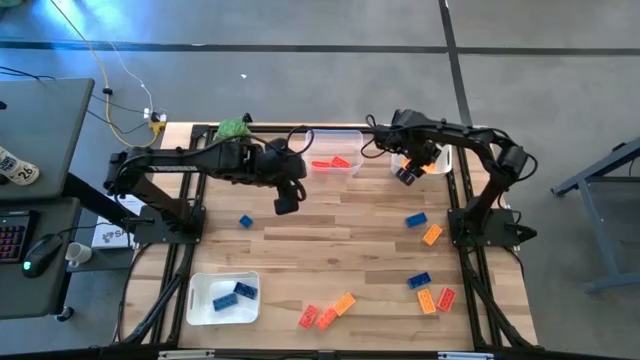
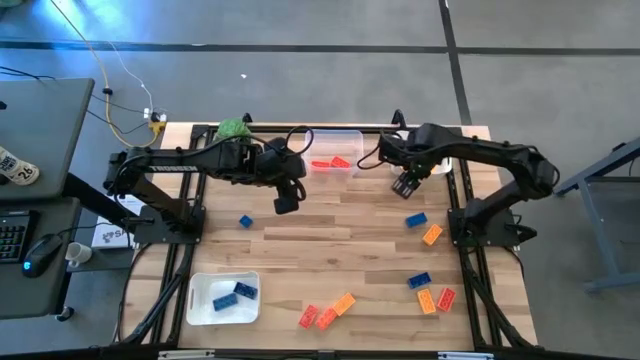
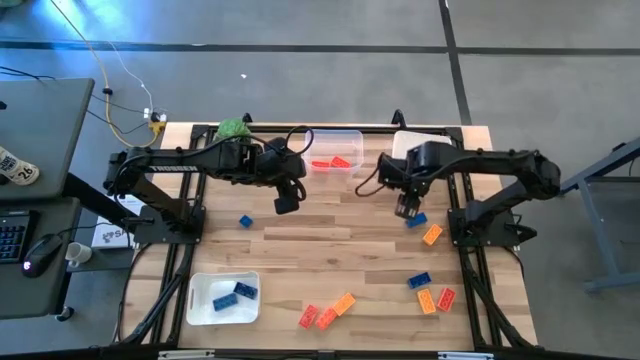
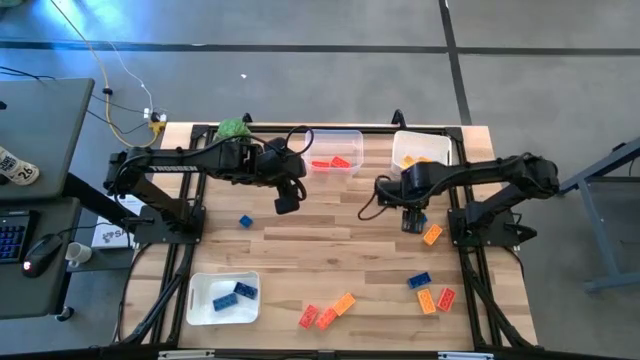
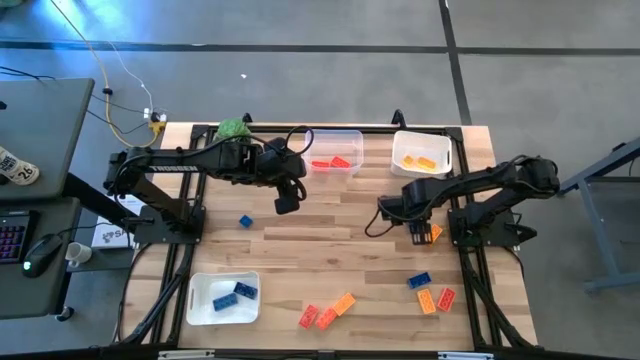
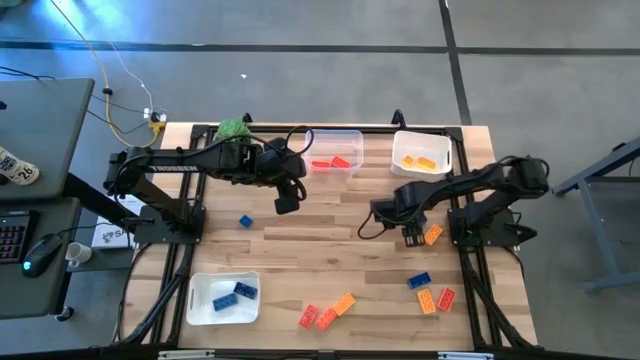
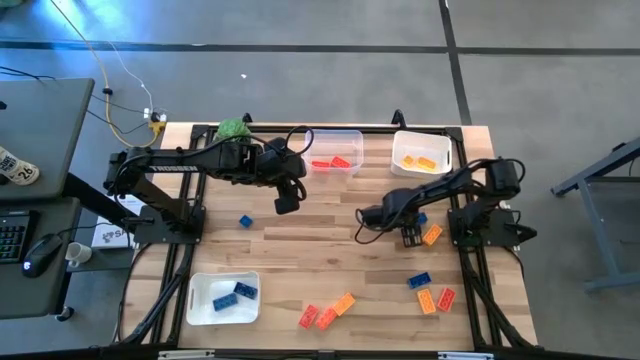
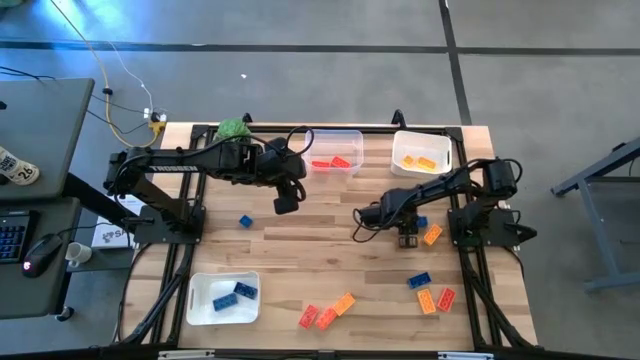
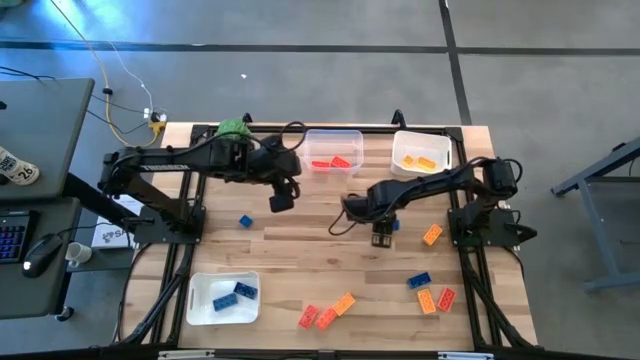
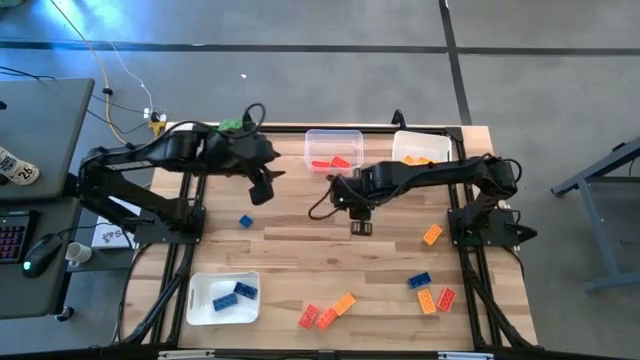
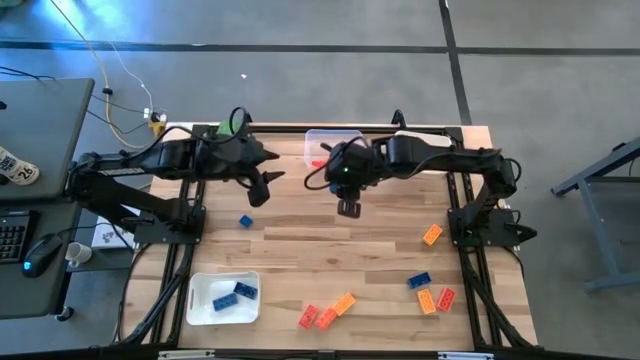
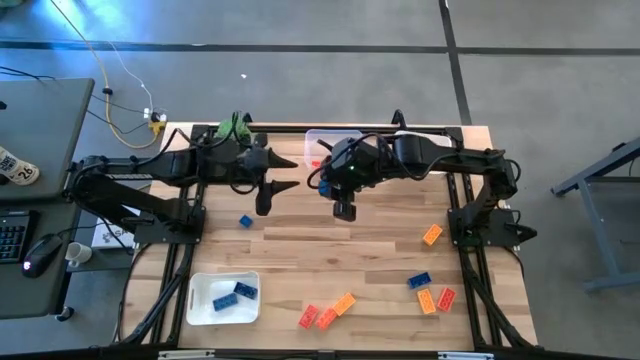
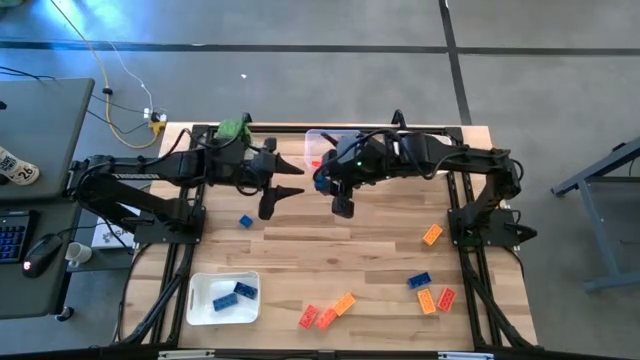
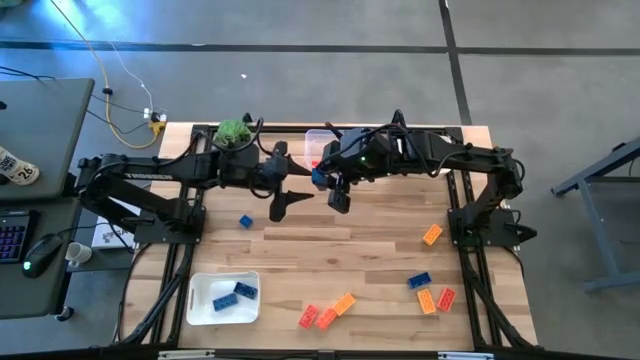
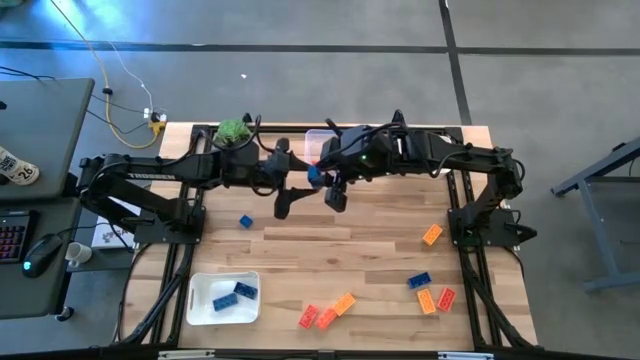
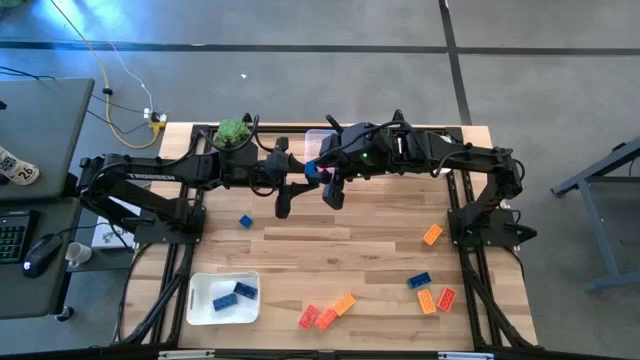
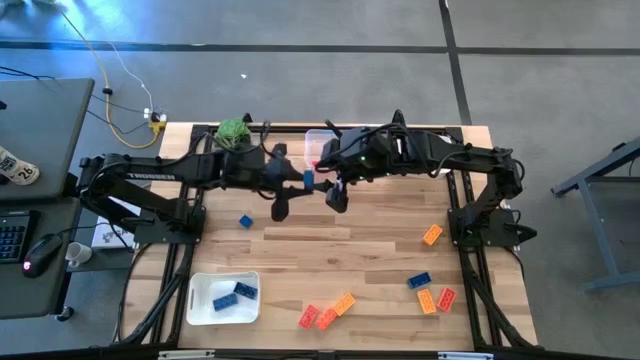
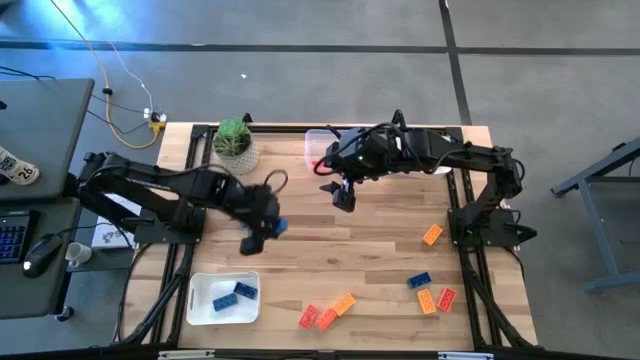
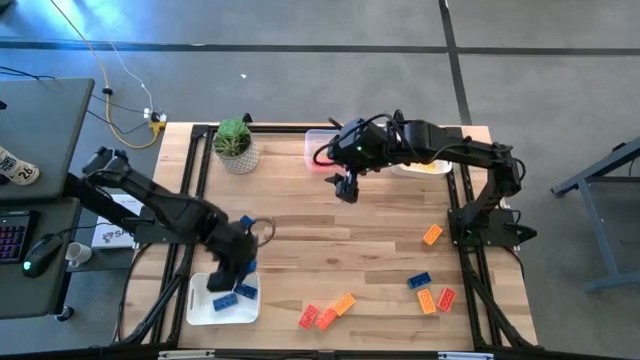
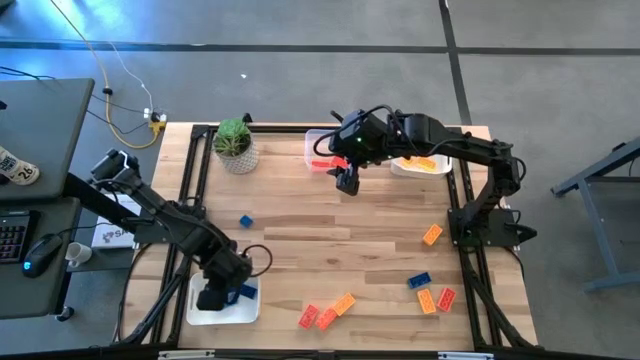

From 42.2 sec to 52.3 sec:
Task: Sort & place blocks by color
Put the blue game piece into the bottom white bin

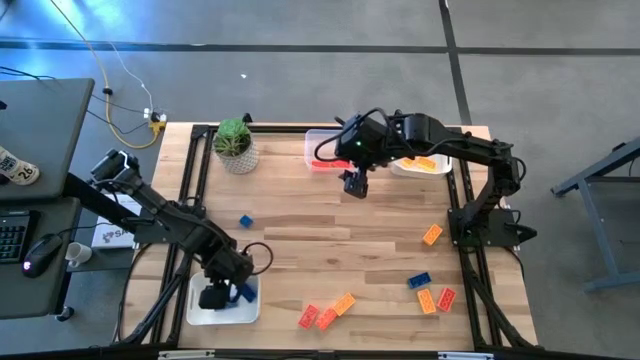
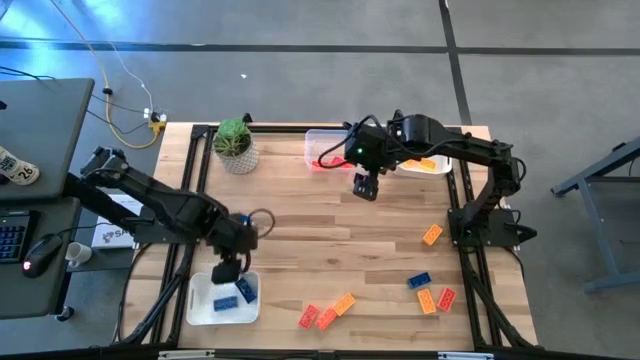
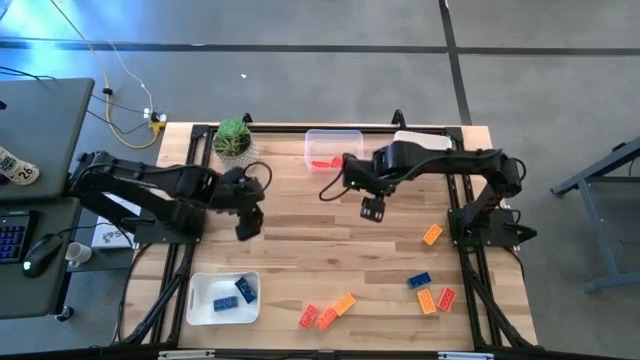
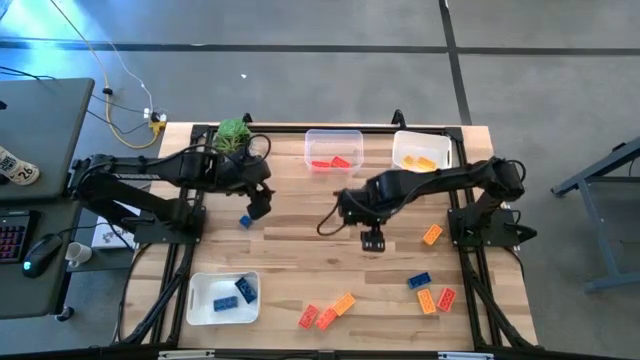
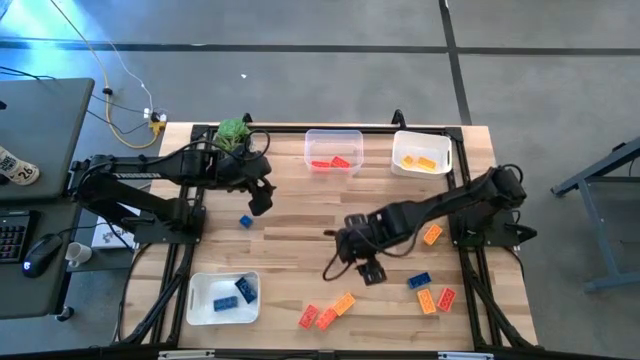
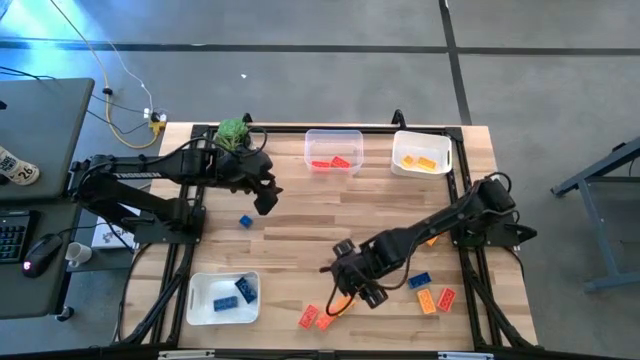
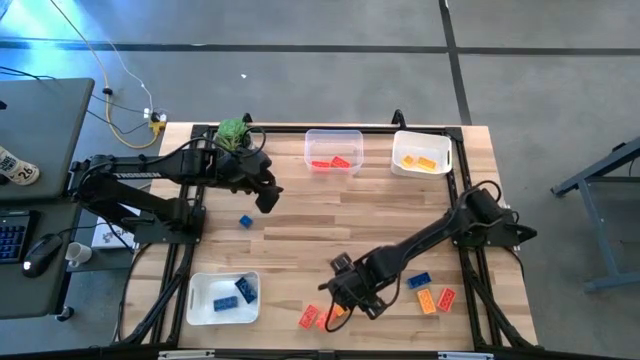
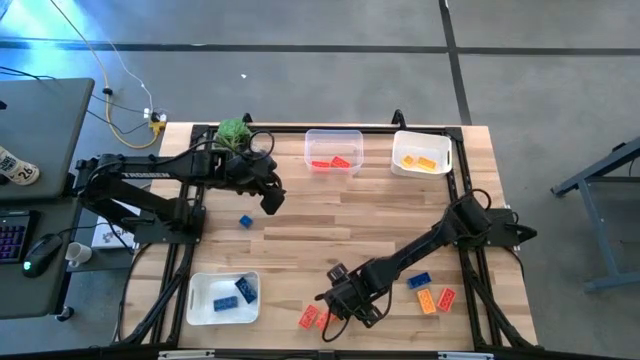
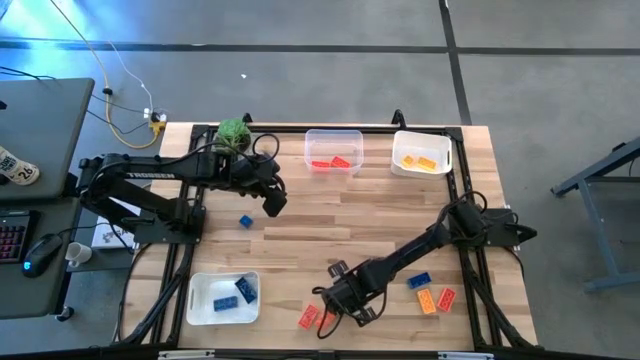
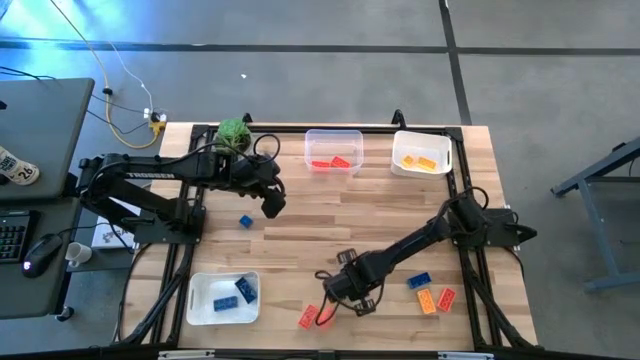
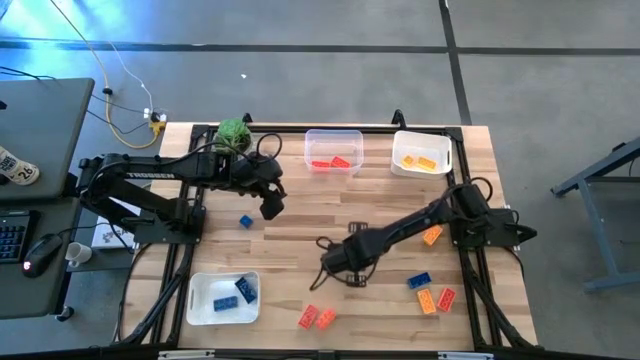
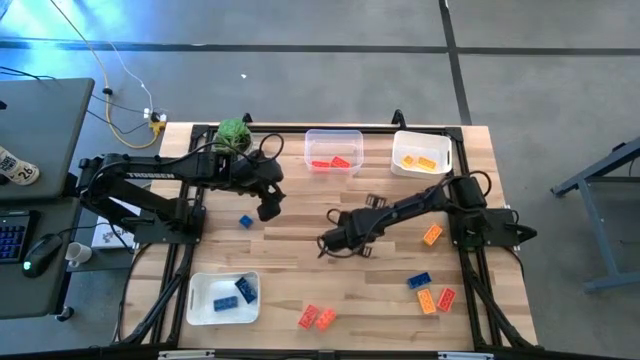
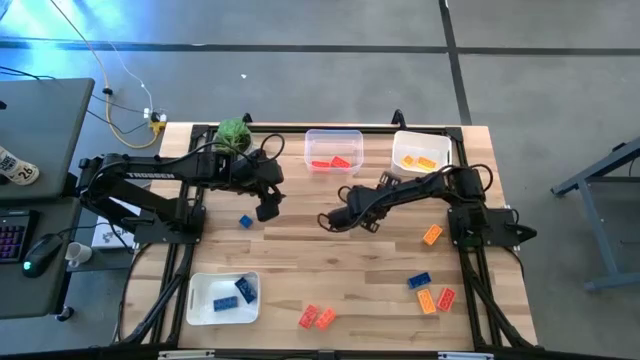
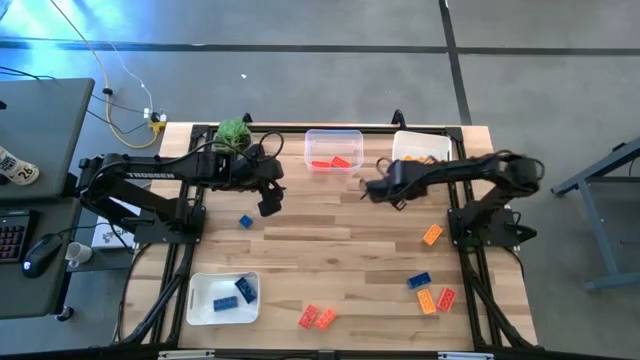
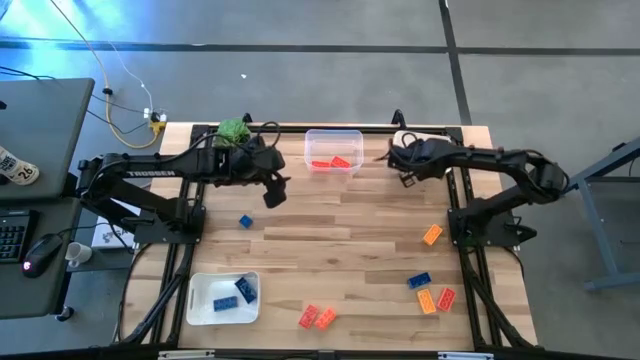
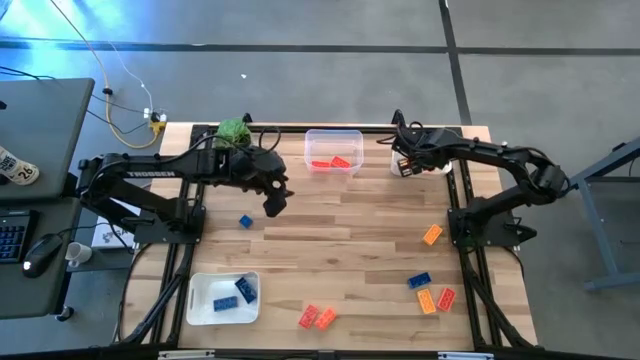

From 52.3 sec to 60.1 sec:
Put the yellow game piece into the top white bin

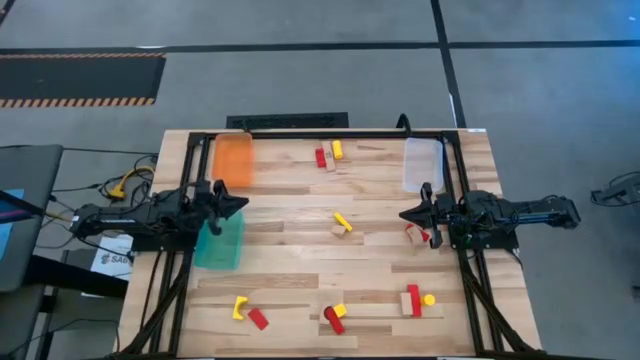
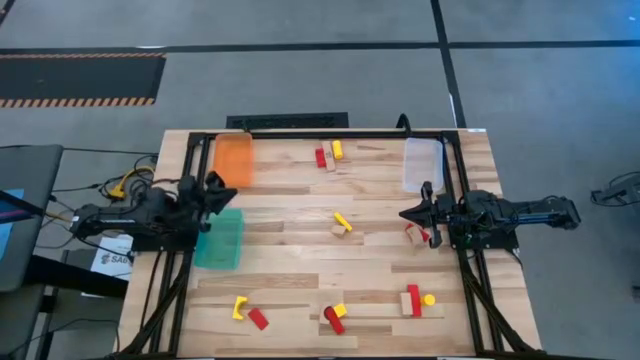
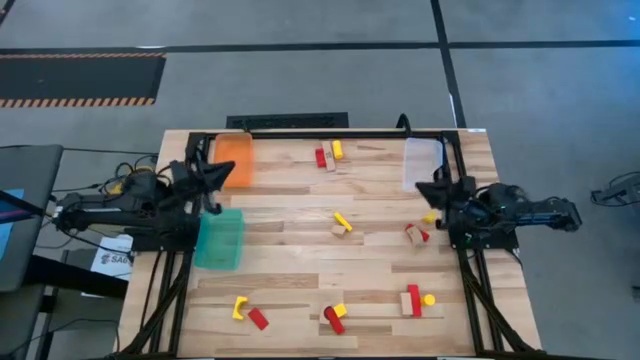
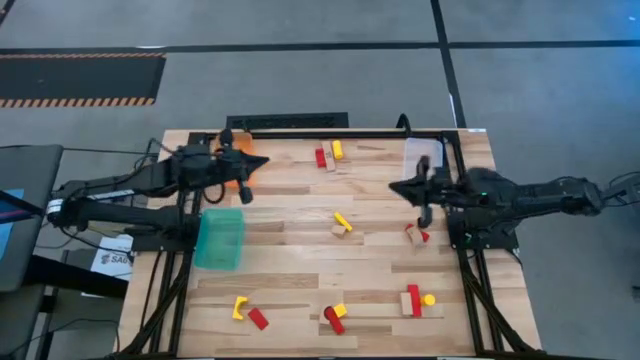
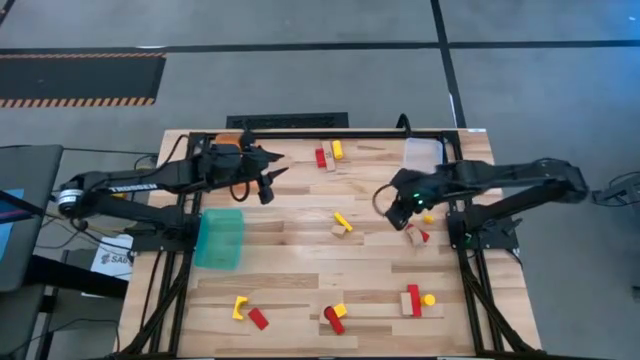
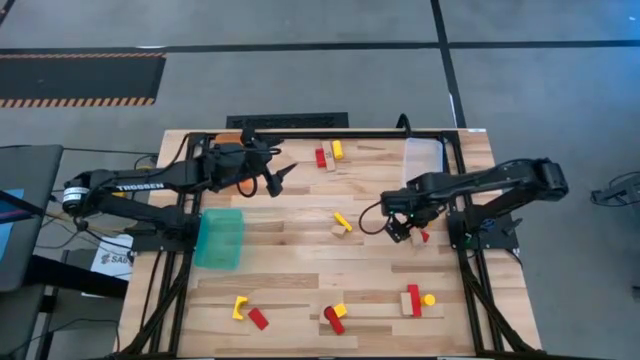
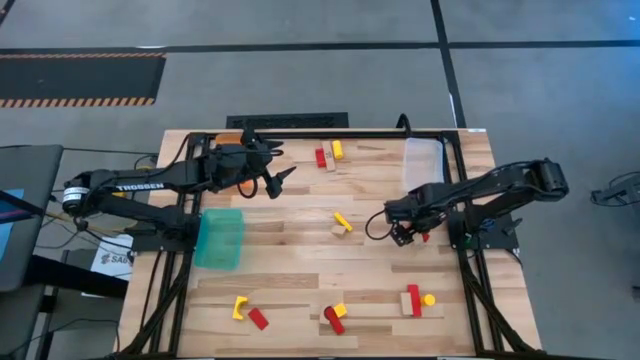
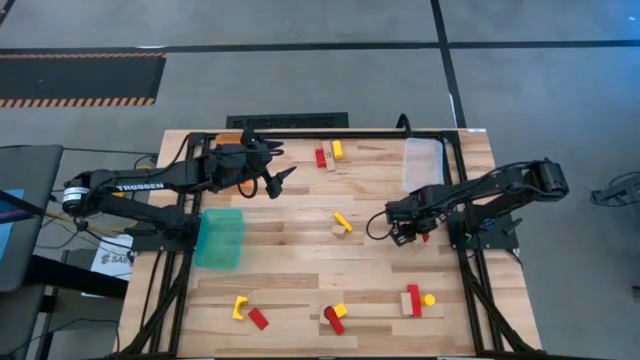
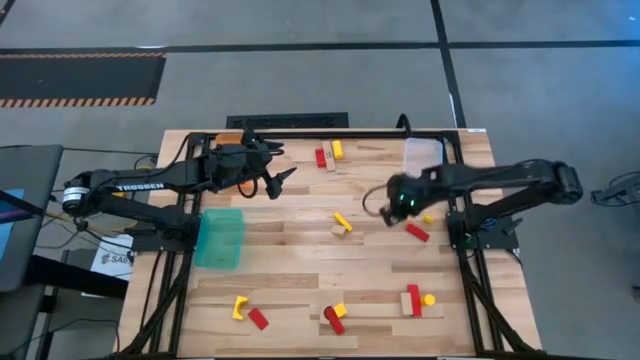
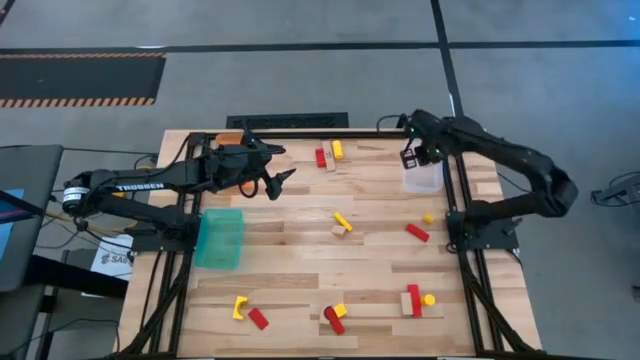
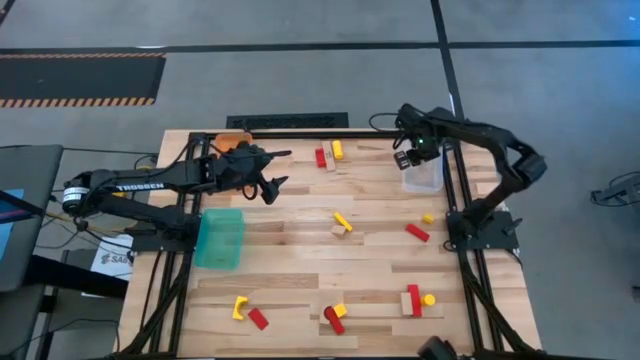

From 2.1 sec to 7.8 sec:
Task: Sort & place blocks by color
Put the brown wooden block into the white bin
